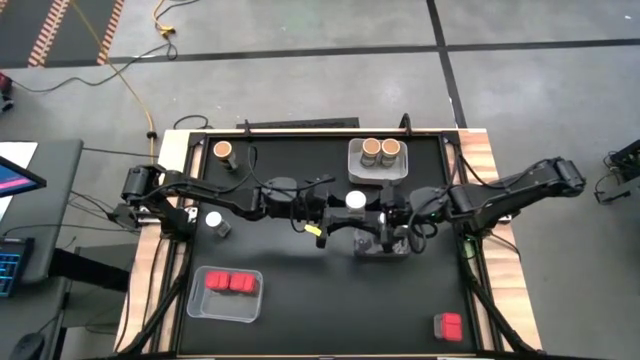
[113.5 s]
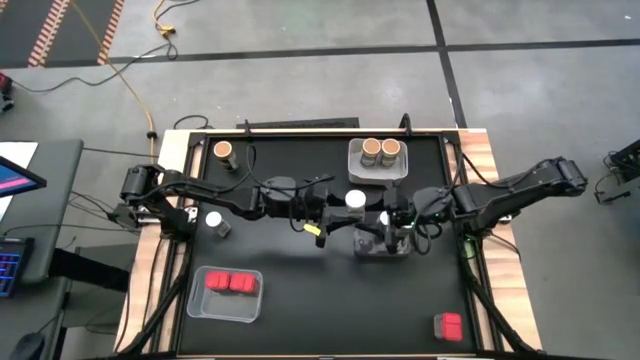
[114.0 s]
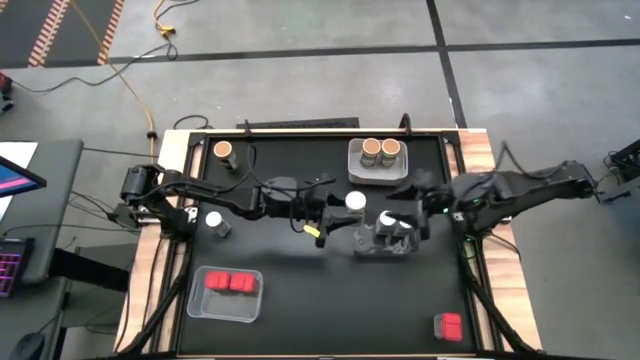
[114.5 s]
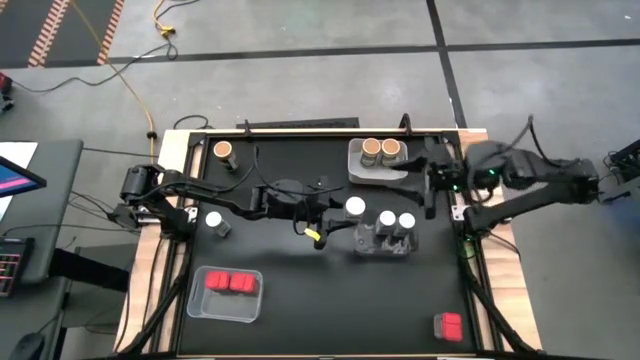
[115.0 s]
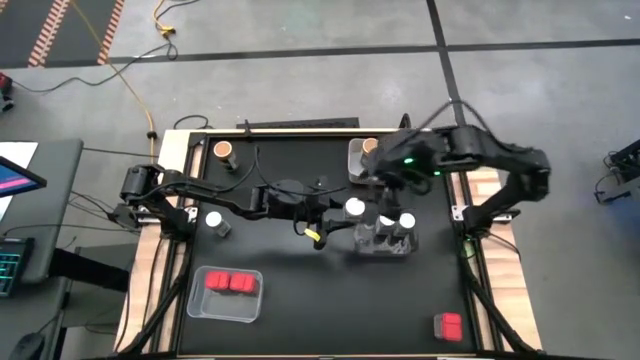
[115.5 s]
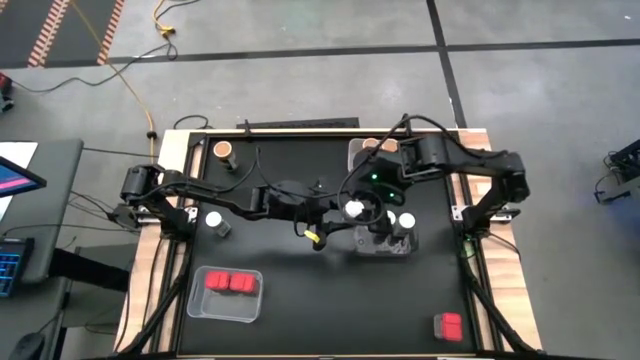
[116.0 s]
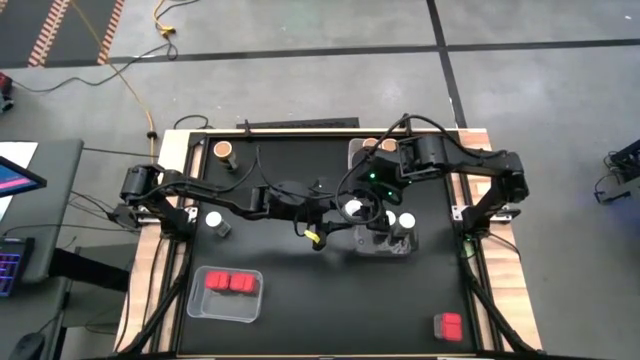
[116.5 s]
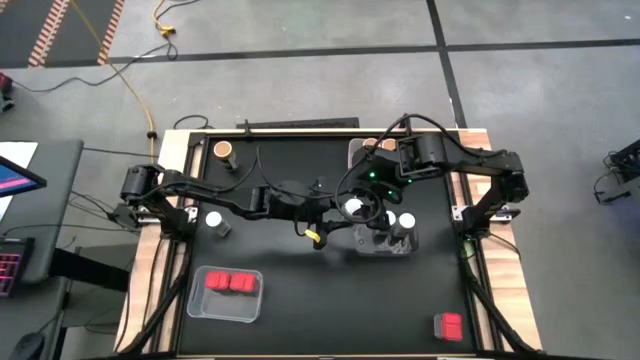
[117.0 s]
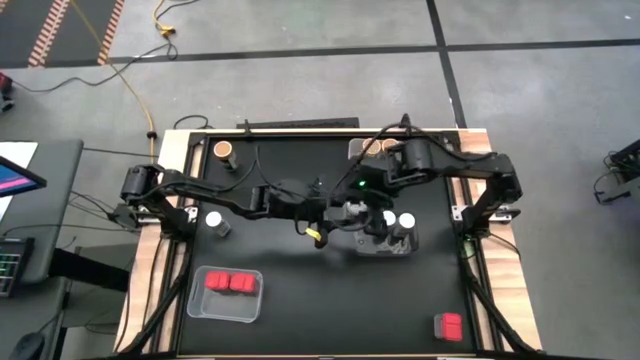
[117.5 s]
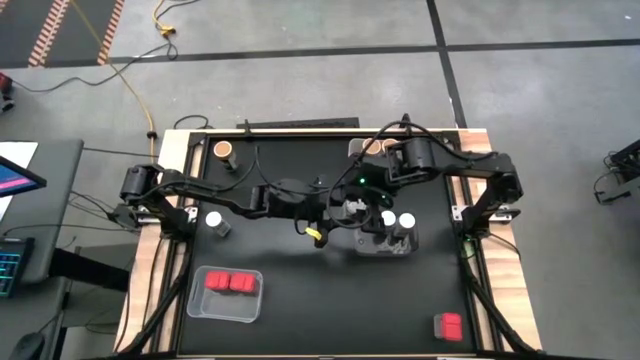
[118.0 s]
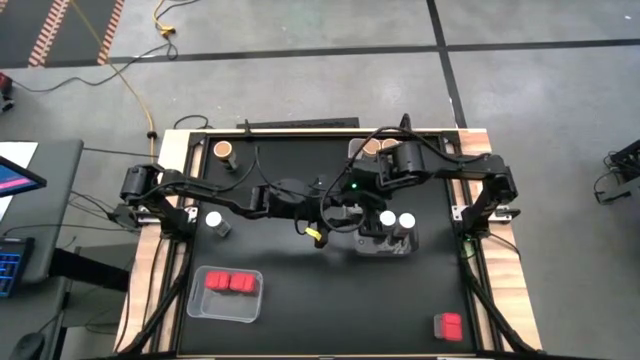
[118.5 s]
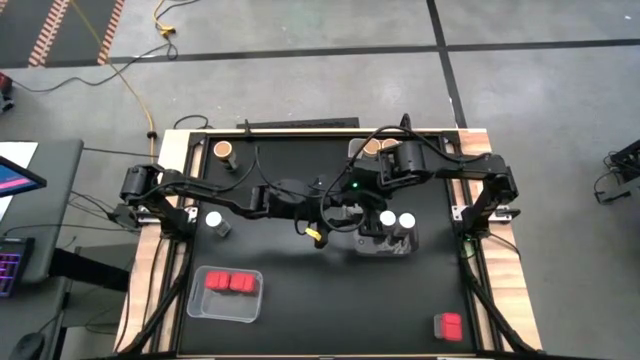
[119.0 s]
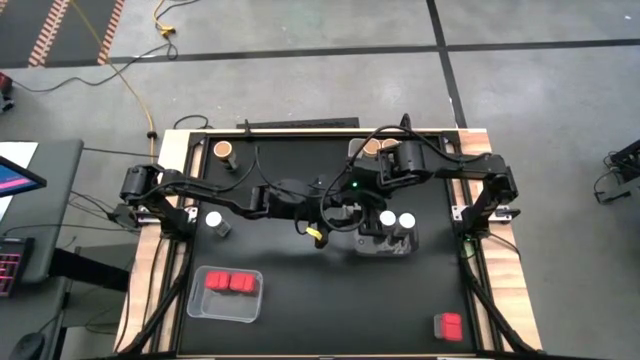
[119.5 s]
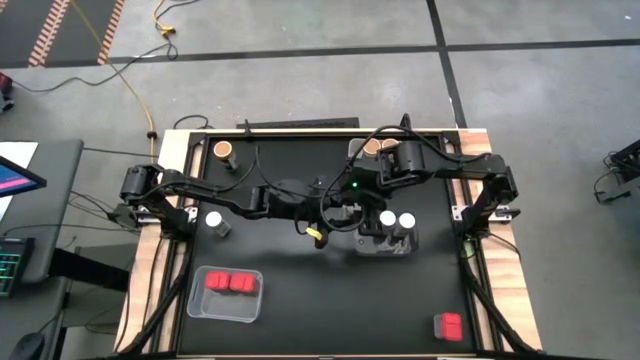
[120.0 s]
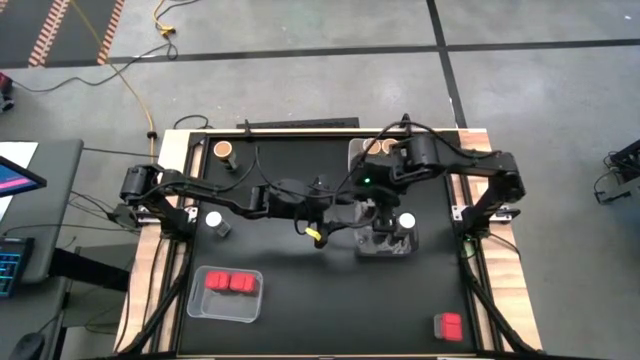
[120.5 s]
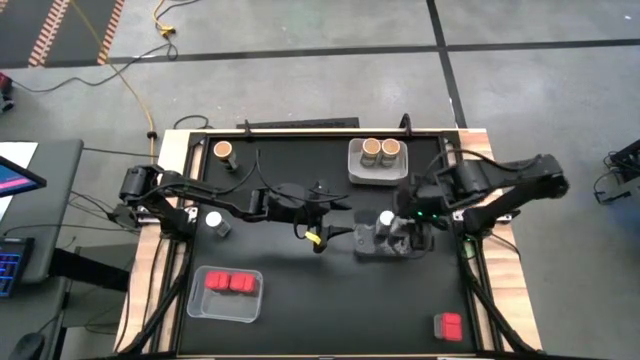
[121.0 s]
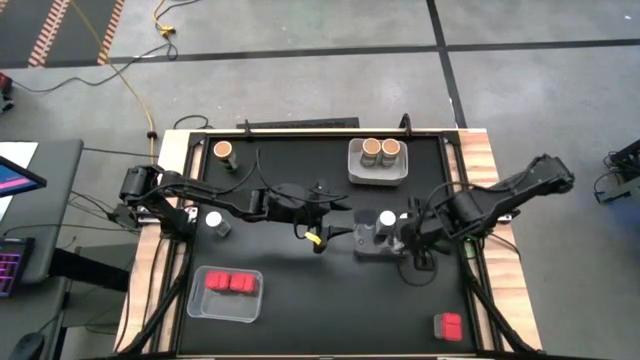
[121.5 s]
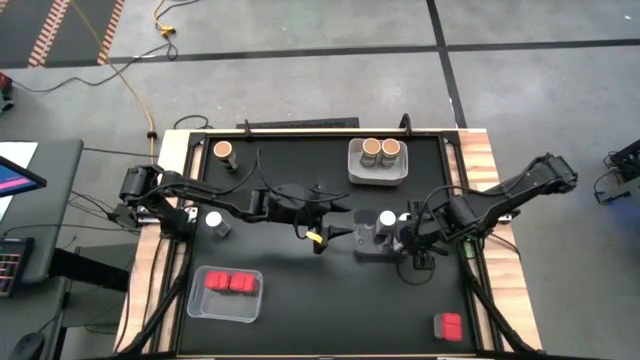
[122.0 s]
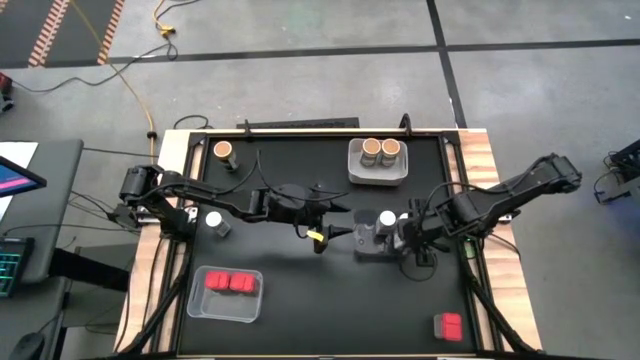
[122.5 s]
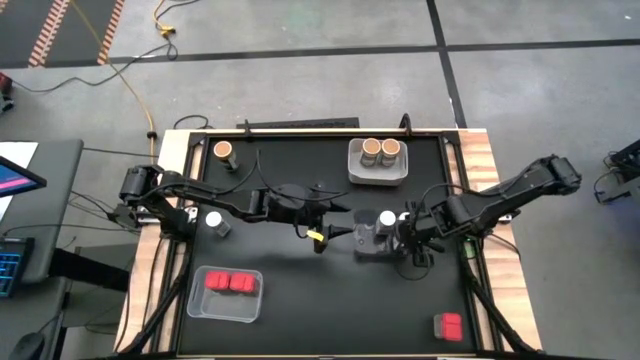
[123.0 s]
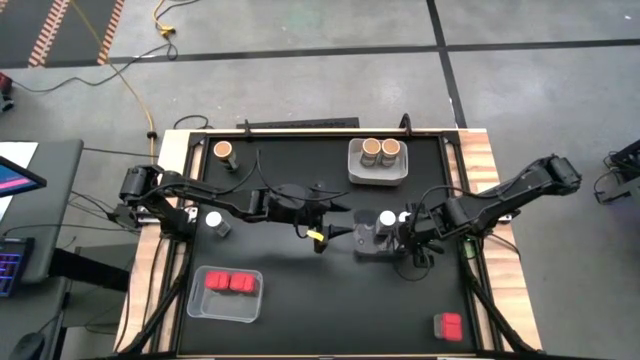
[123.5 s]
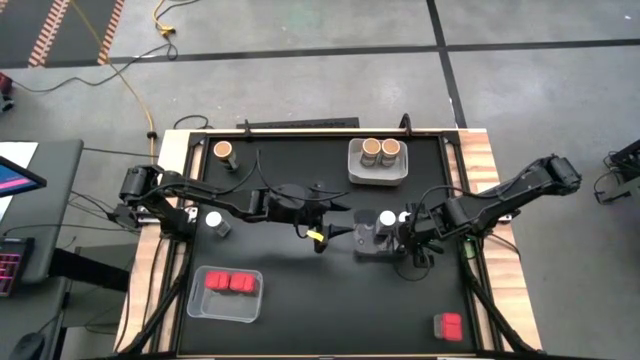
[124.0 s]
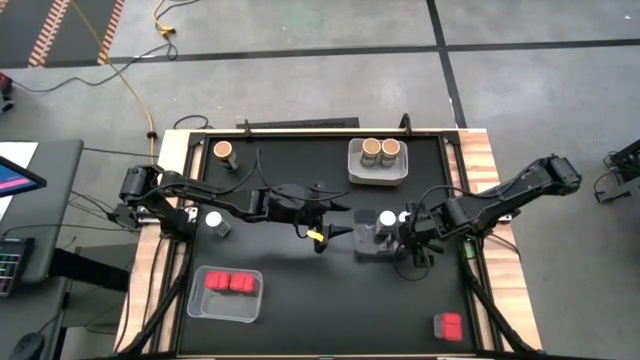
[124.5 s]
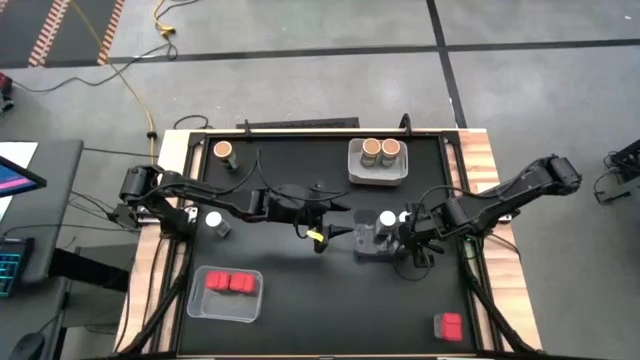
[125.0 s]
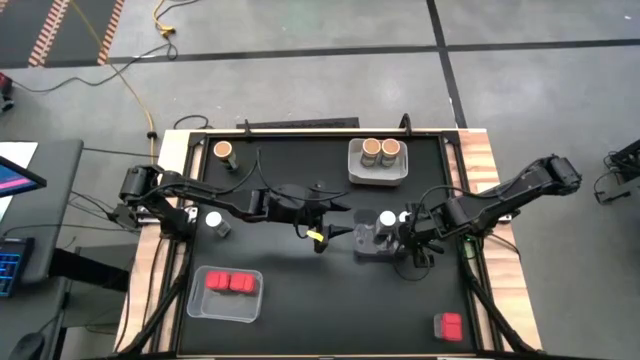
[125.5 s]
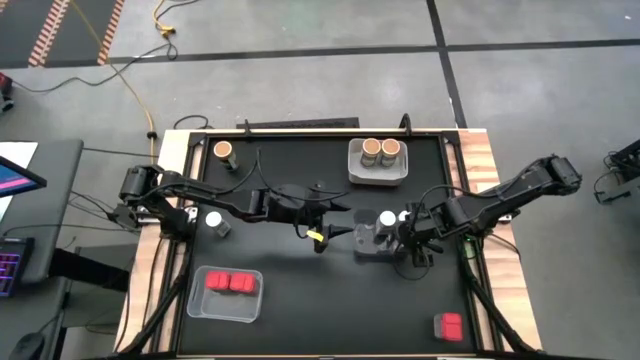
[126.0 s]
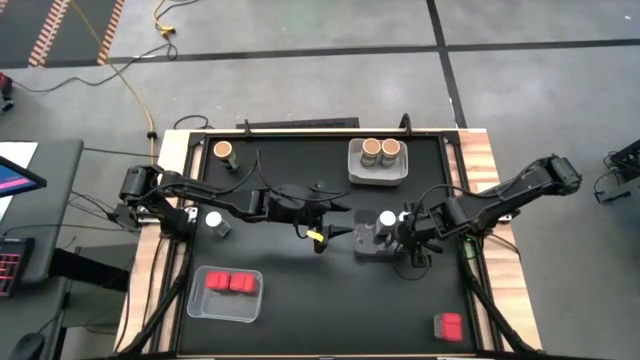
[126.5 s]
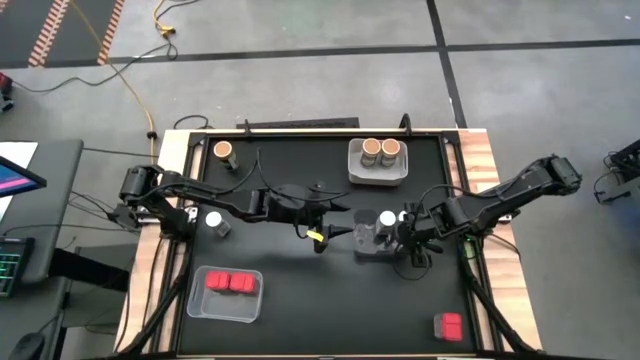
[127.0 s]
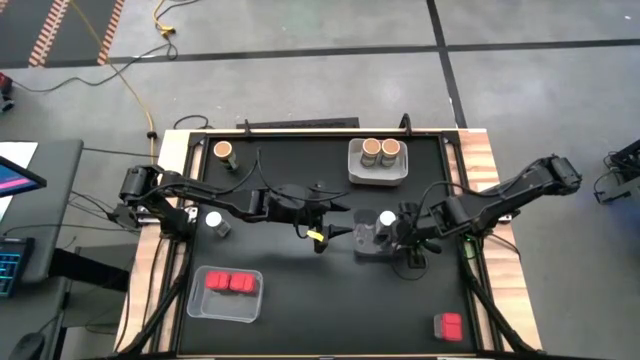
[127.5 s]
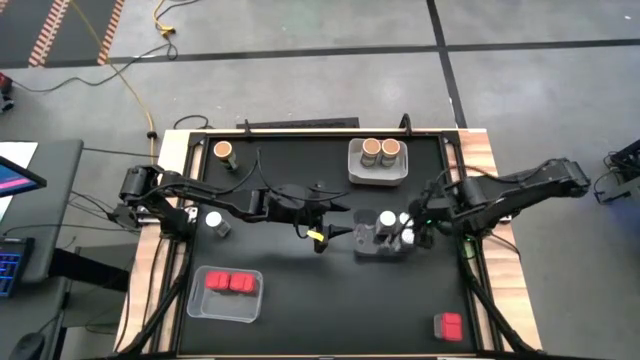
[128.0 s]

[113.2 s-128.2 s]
Task: Sort spices by type
Put the top white spice bottle in the black bin

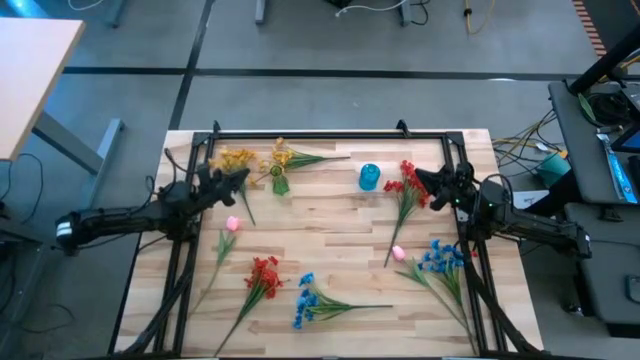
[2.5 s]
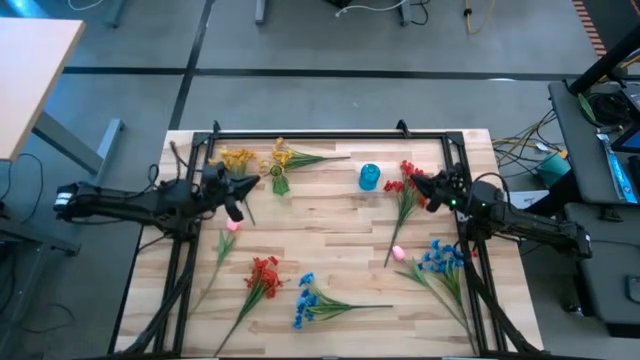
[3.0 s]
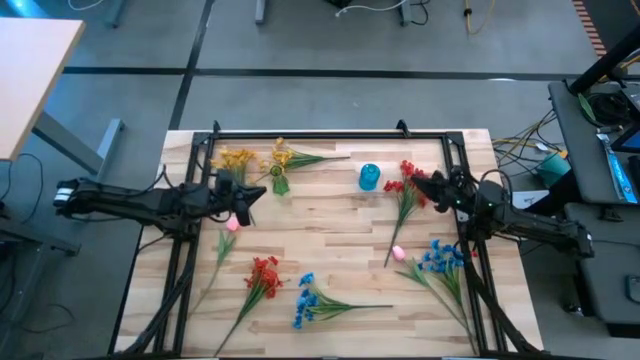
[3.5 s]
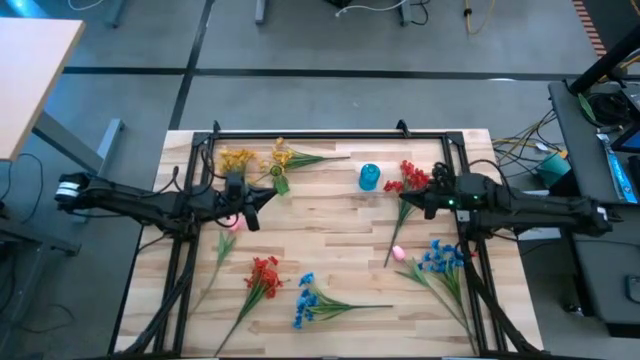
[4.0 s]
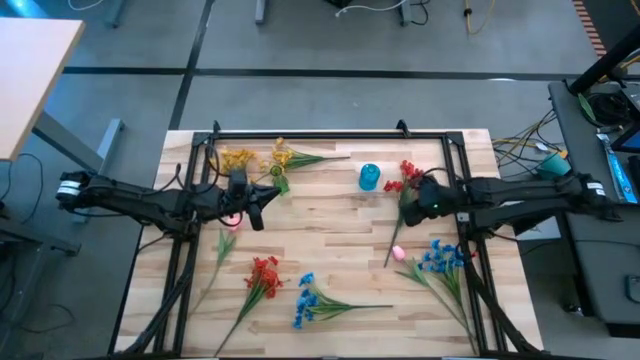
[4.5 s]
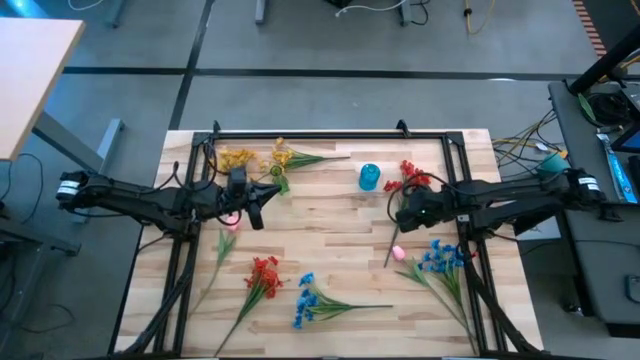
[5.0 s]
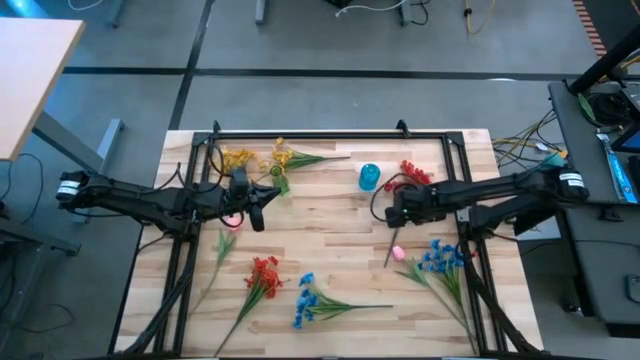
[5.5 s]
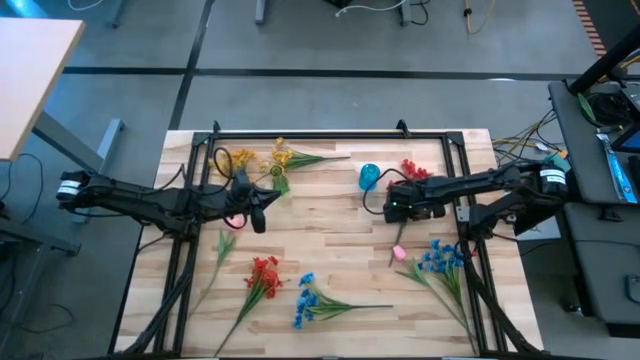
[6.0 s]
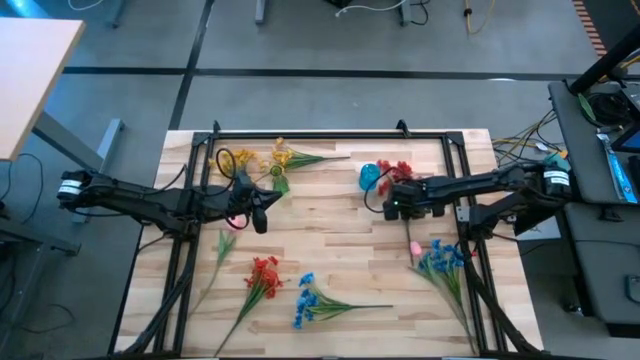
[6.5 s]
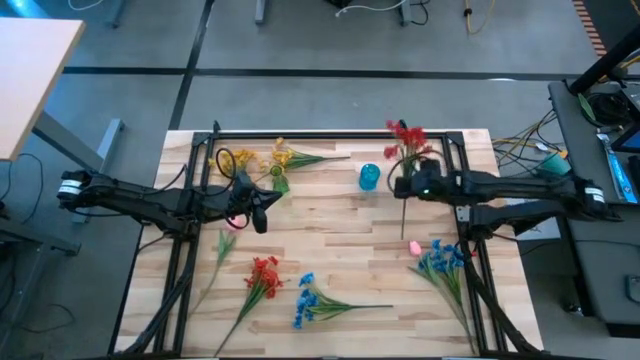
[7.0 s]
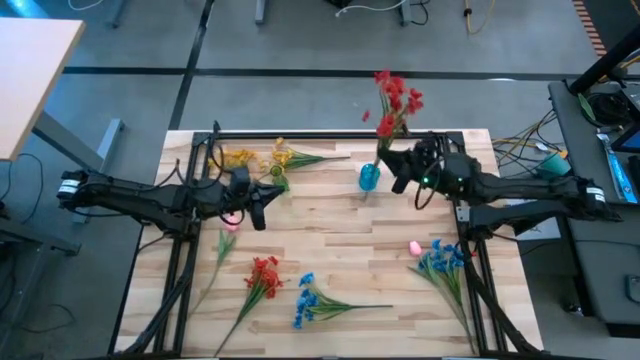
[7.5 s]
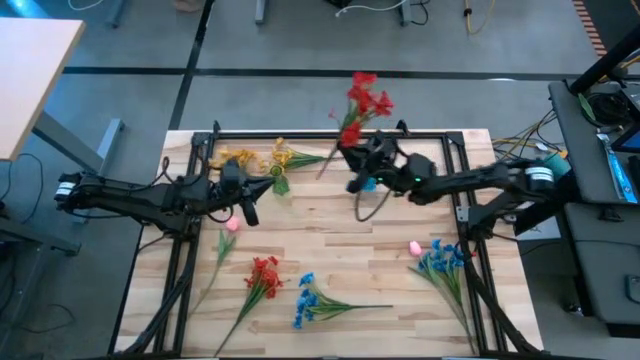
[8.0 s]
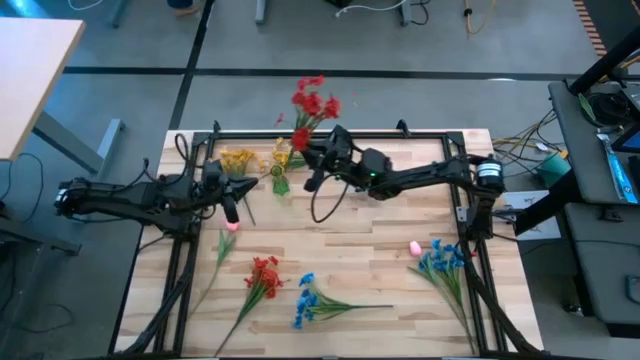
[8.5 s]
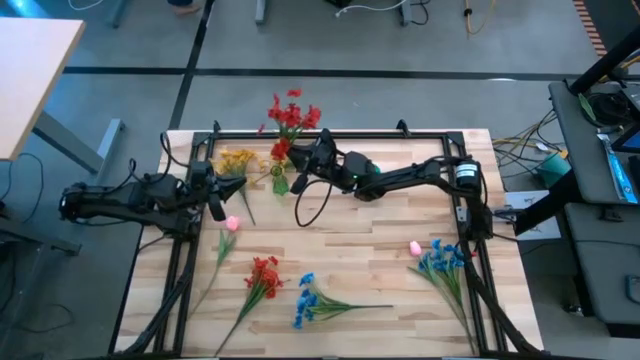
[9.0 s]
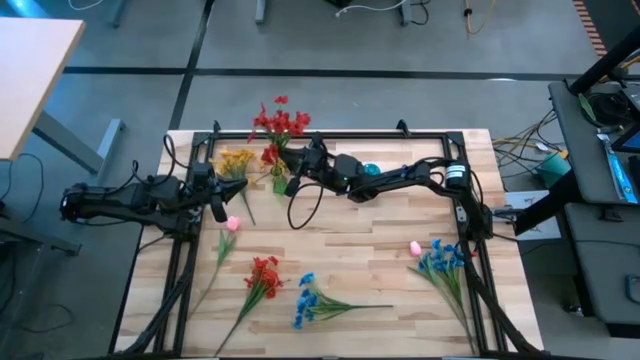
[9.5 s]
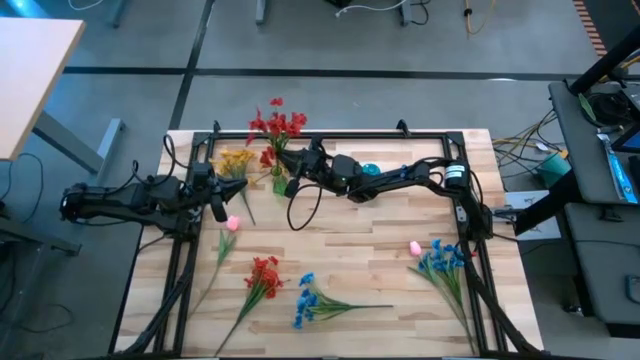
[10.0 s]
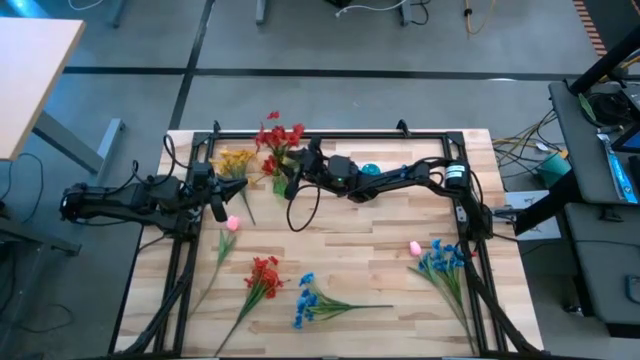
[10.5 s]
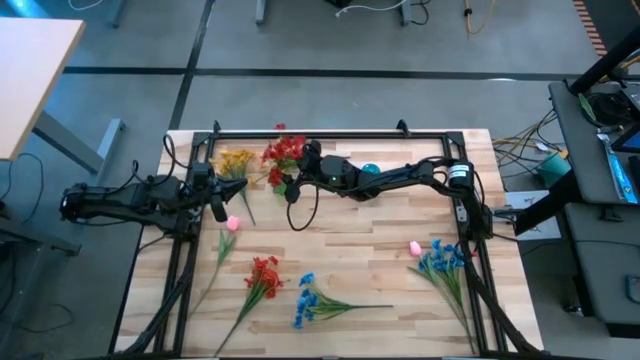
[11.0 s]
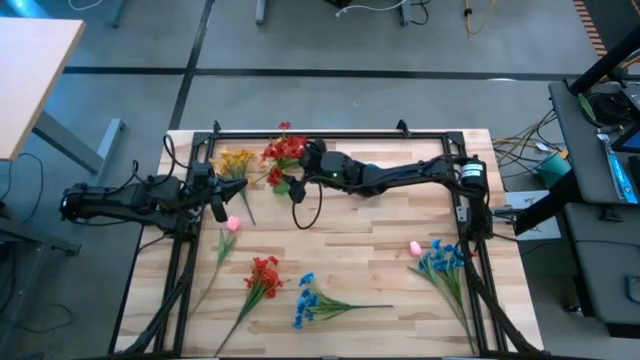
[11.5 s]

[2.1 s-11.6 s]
Task: Sort flowers into vase by color
Put the top red flowers into the green vase
